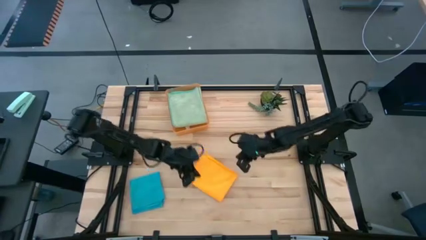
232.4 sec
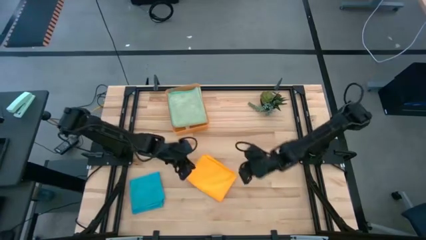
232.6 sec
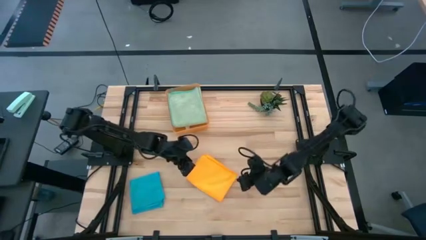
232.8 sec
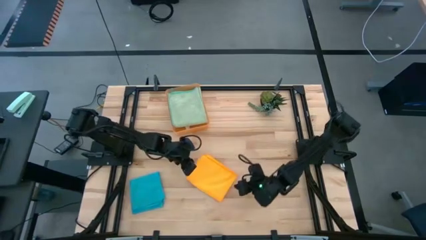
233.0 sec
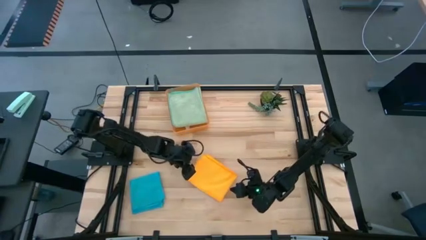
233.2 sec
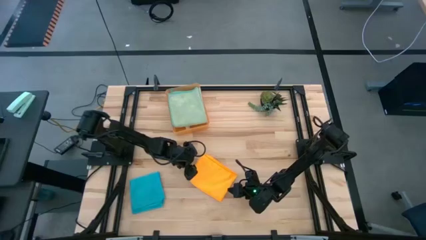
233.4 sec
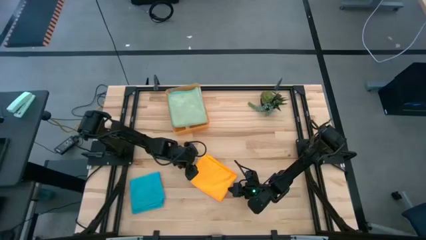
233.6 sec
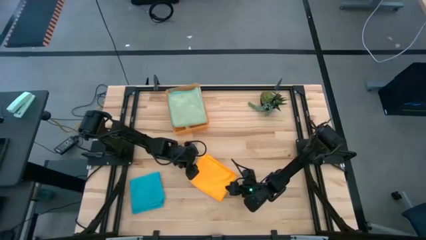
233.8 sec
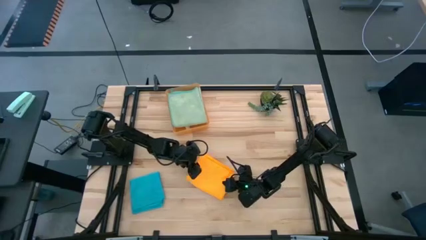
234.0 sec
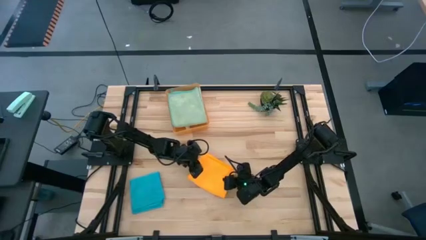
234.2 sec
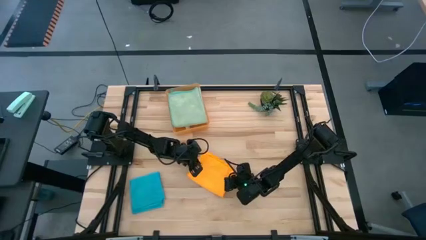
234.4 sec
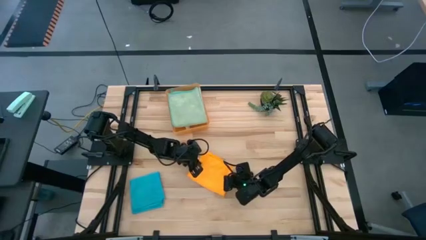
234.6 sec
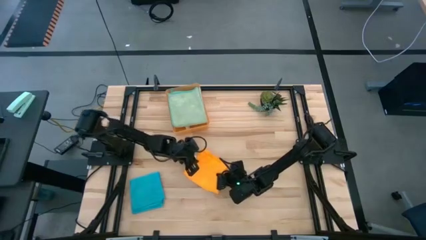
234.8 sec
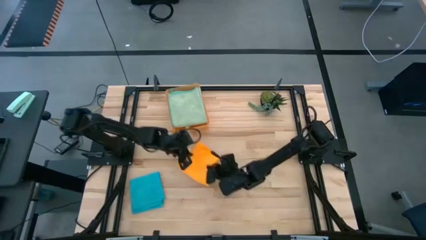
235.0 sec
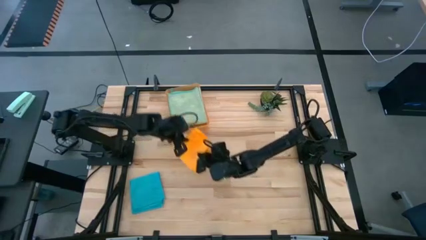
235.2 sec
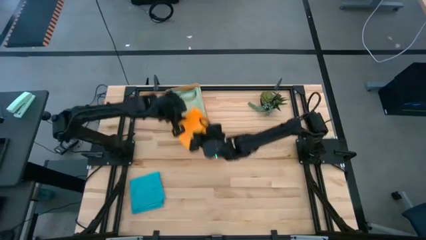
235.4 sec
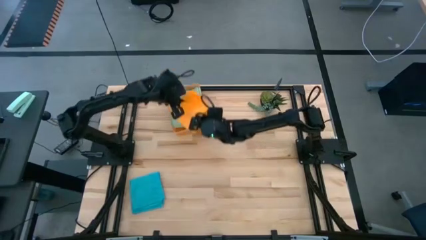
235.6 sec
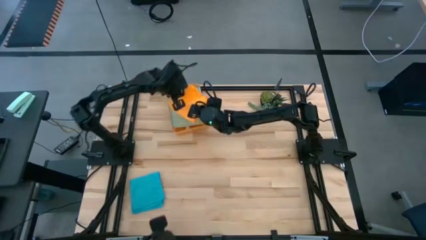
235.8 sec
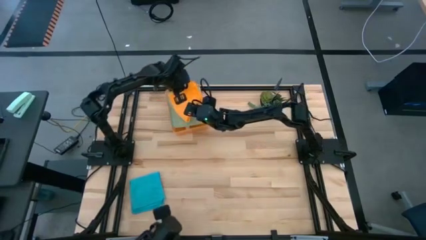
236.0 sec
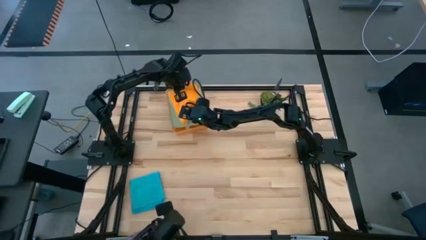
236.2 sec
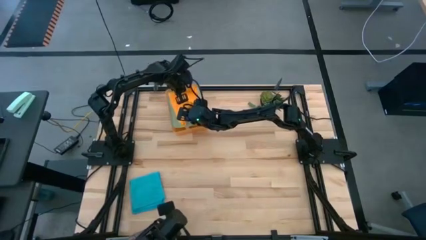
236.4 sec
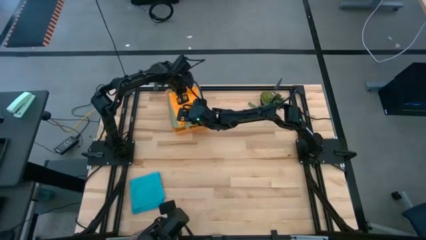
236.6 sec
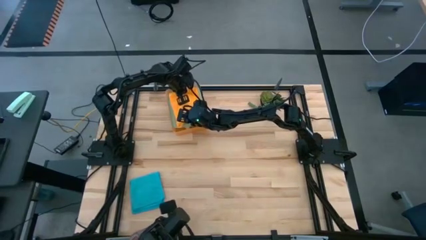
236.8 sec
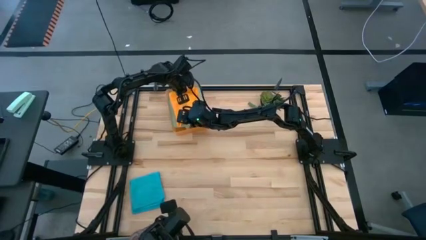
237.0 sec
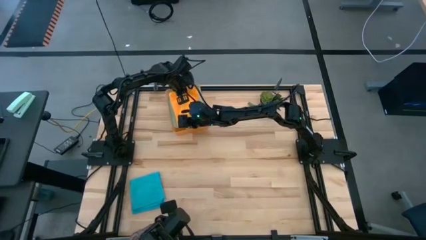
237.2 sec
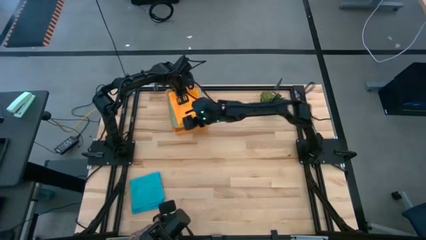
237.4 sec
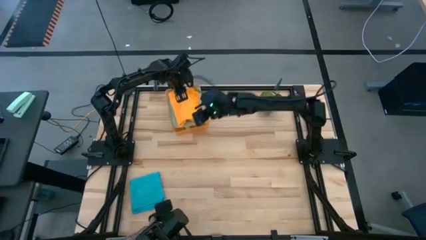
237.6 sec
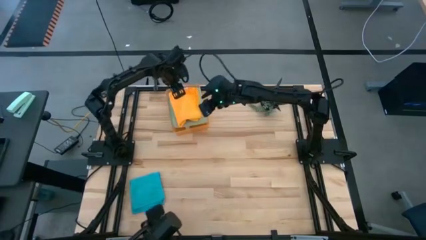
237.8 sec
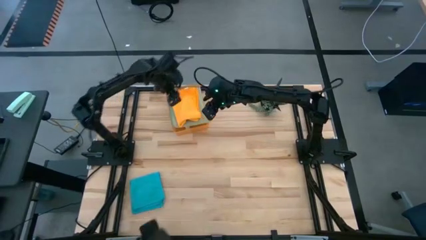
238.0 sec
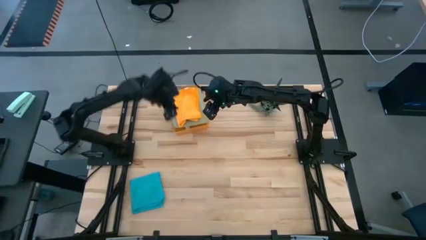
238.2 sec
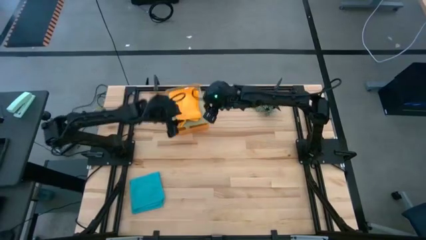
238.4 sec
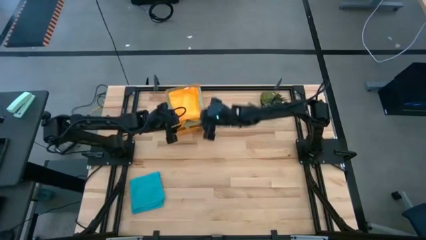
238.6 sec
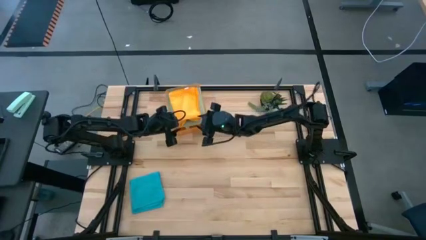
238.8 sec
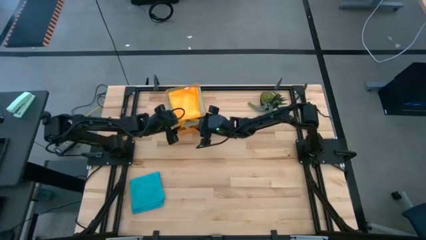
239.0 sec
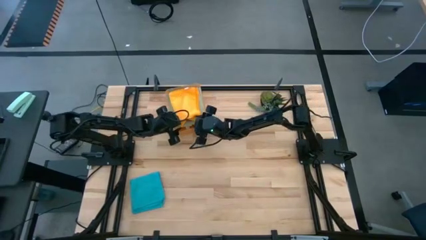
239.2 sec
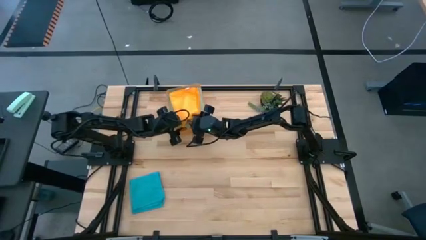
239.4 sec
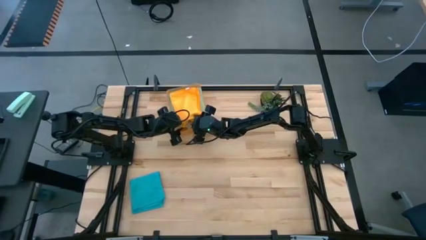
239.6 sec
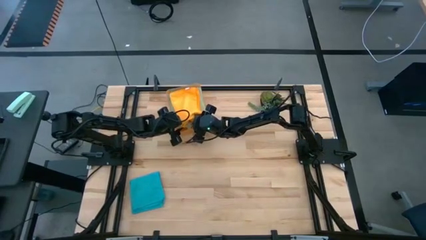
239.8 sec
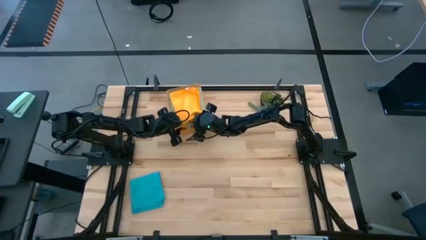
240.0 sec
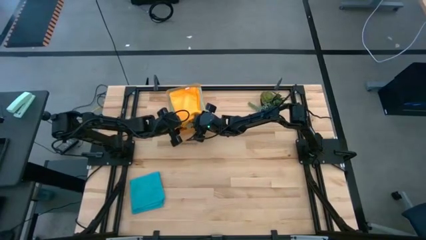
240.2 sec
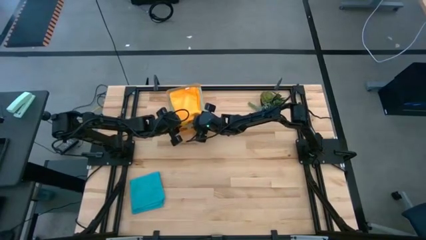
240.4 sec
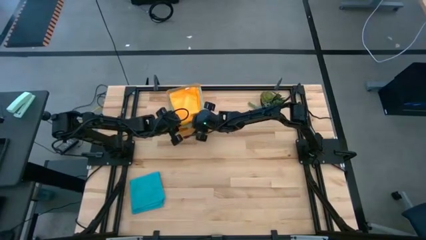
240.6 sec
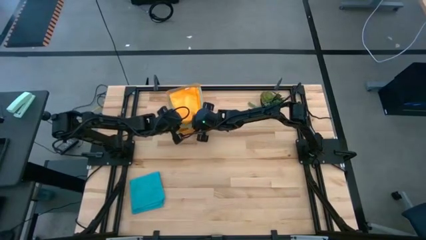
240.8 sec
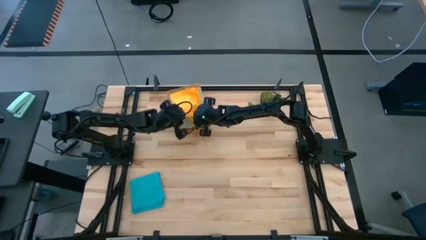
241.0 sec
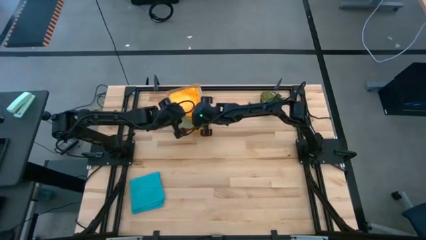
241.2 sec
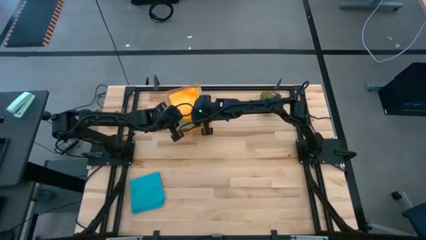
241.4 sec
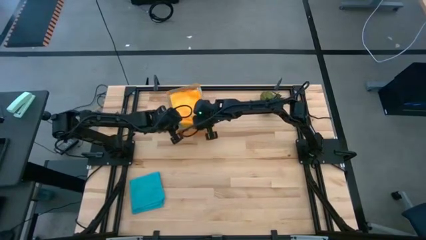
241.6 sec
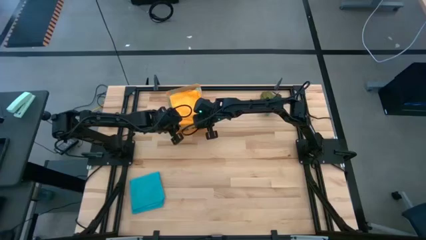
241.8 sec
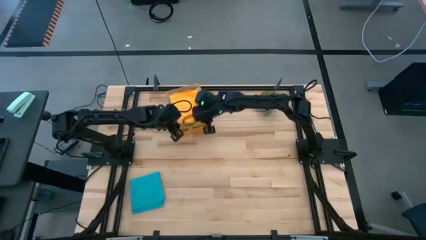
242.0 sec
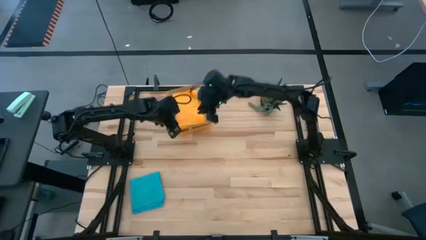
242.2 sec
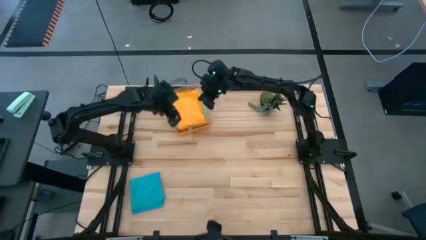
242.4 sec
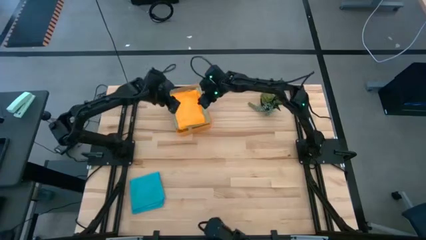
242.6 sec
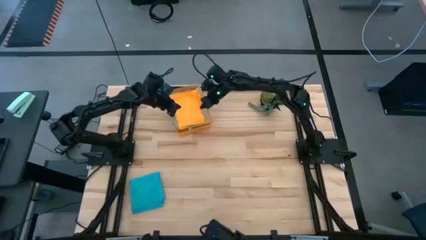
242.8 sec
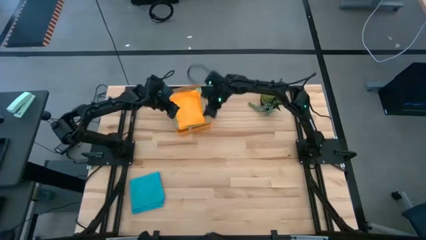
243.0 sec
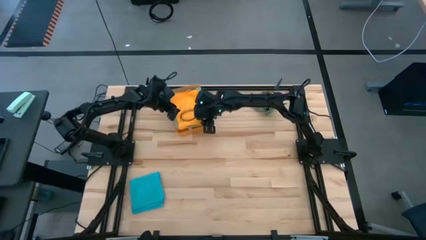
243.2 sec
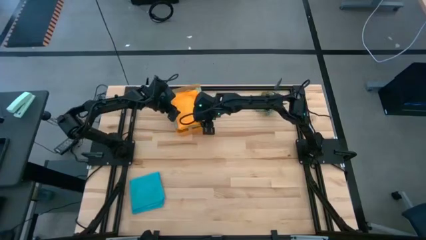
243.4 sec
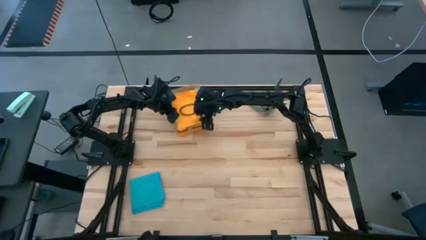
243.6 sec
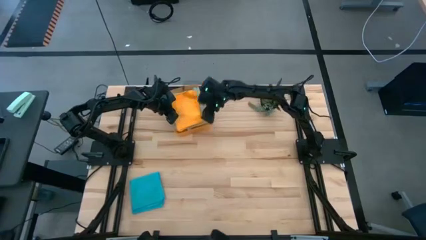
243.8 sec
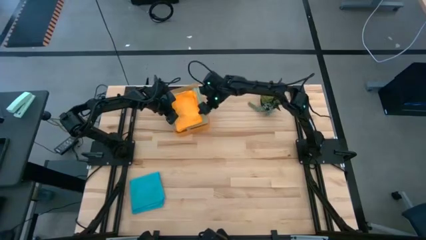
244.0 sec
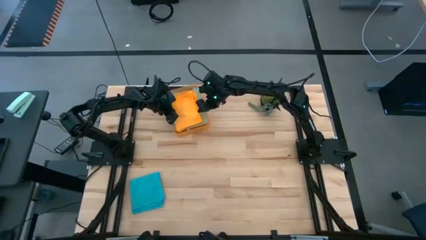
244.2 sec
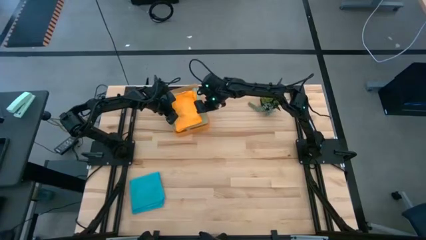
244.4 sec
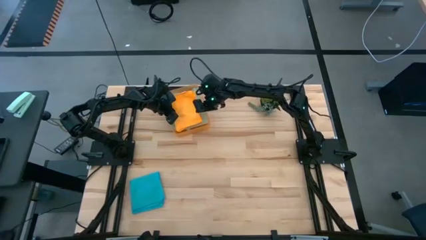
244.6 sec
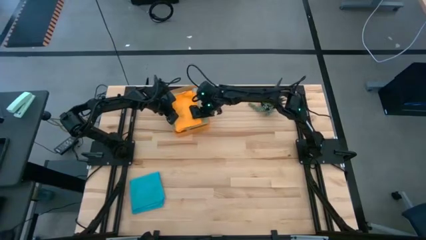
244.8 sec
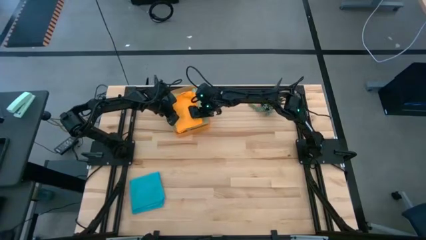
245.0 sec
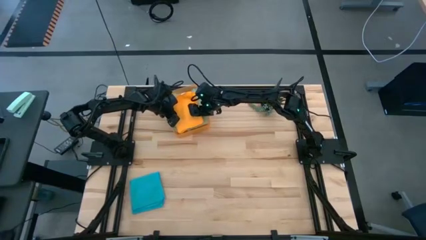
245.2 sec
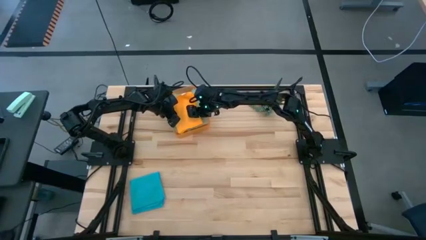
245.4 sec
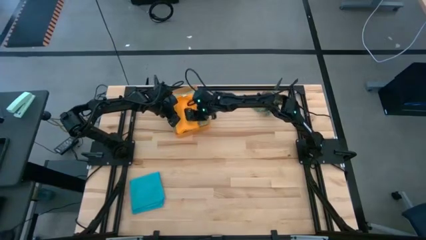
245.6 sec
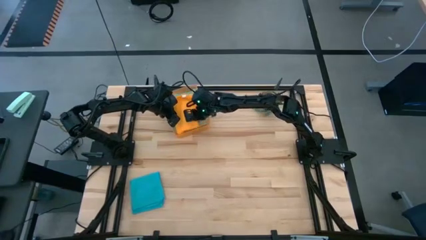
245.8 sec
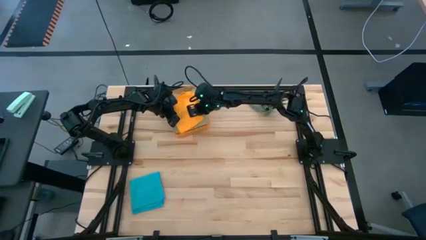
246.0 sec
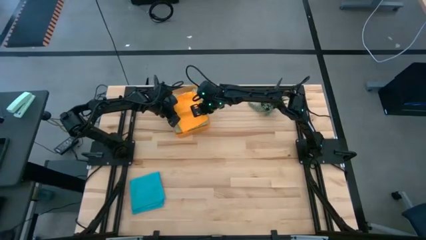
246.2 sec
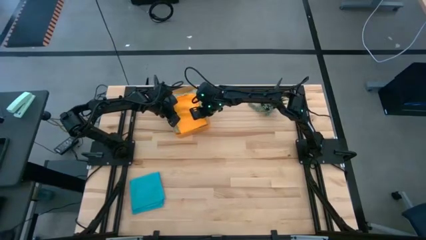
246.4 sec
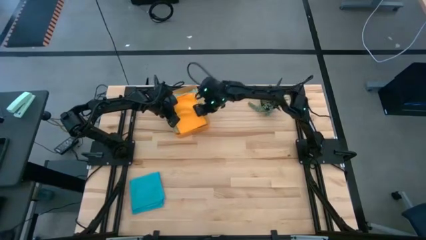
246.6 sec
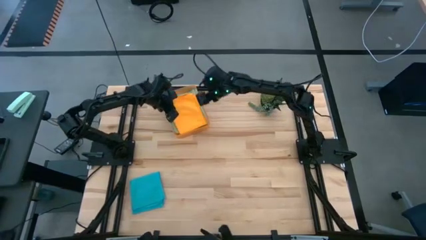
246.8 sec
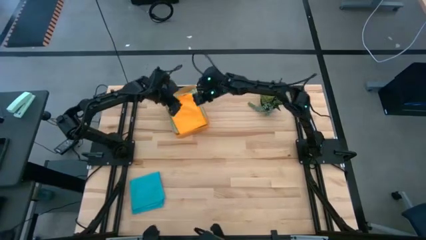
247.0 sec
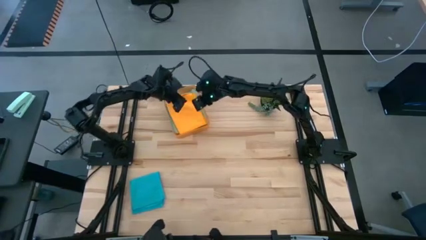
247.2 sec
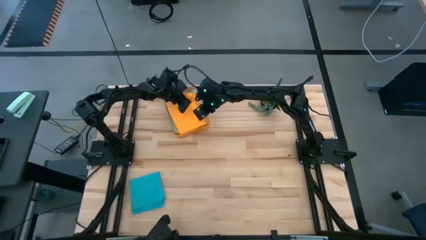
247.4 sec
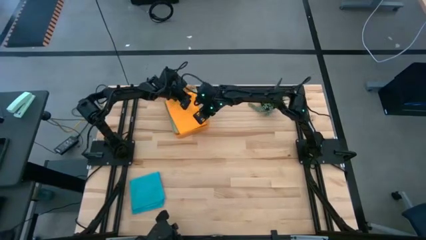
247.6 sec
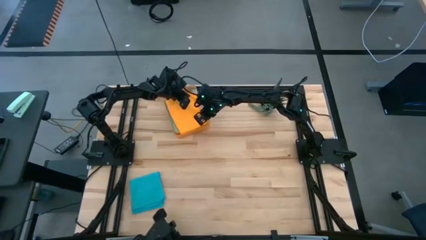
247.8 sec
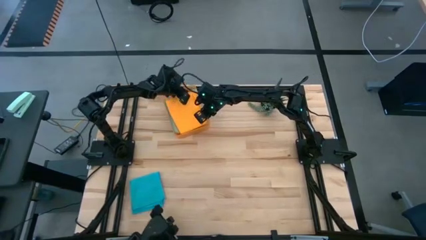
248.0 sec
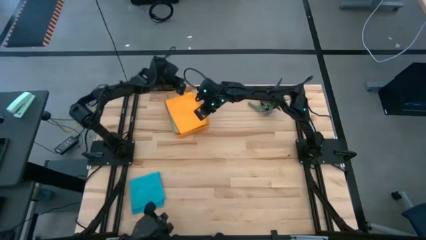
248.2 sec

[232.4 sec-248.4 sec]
Task: Fold microfiber towels
Put the orange microfiber cloth into the orange bin
